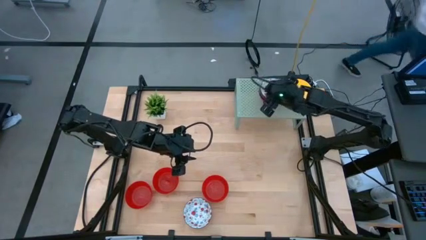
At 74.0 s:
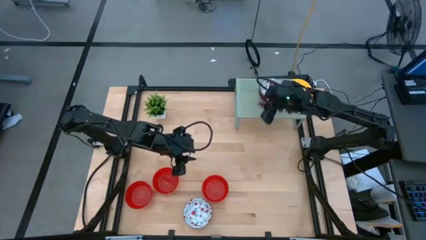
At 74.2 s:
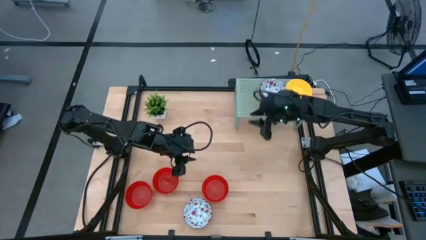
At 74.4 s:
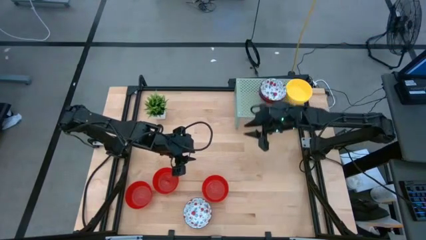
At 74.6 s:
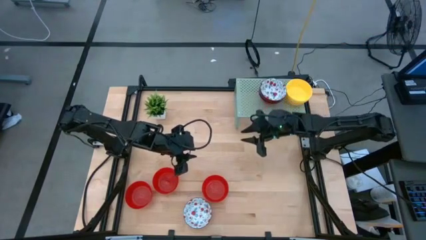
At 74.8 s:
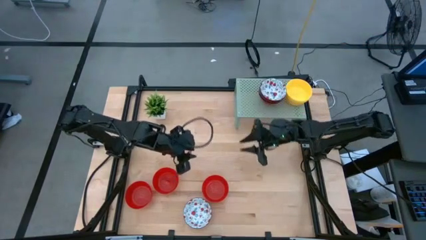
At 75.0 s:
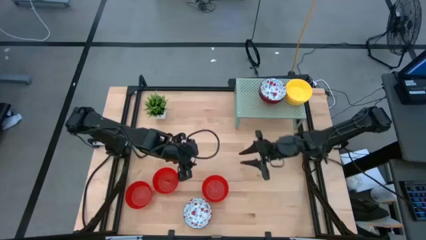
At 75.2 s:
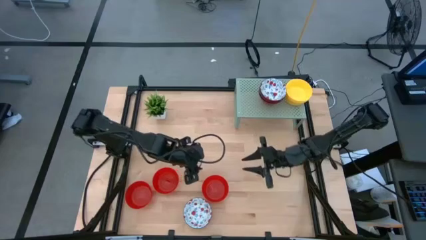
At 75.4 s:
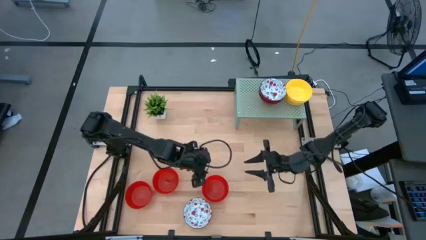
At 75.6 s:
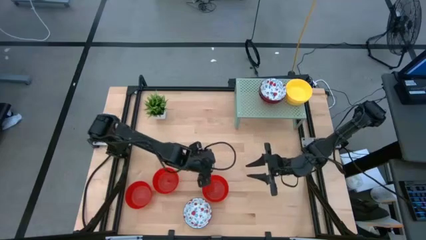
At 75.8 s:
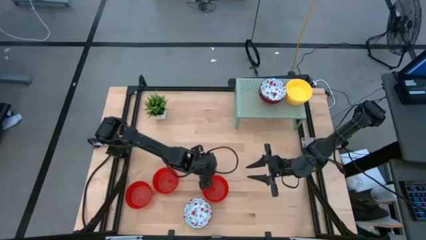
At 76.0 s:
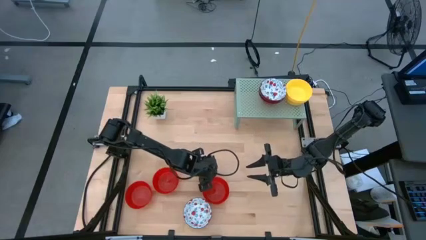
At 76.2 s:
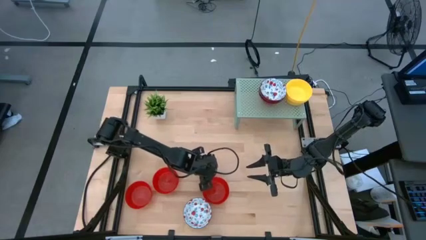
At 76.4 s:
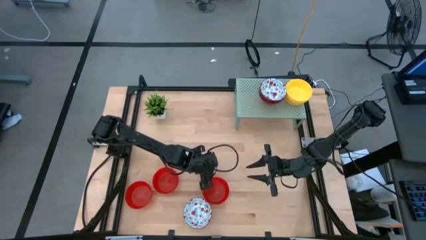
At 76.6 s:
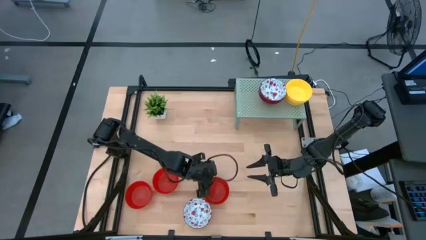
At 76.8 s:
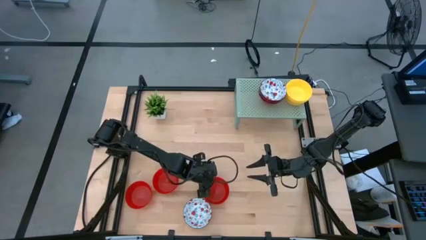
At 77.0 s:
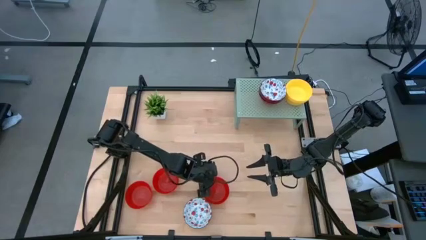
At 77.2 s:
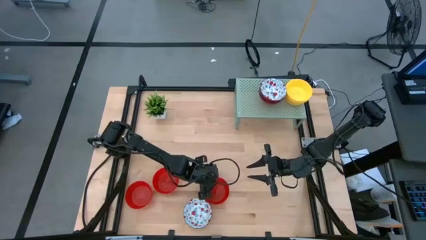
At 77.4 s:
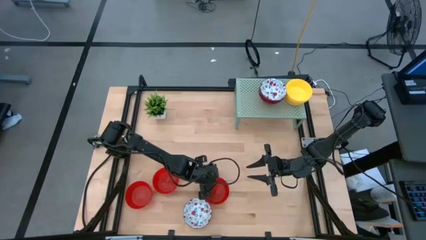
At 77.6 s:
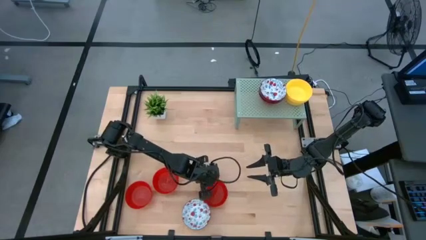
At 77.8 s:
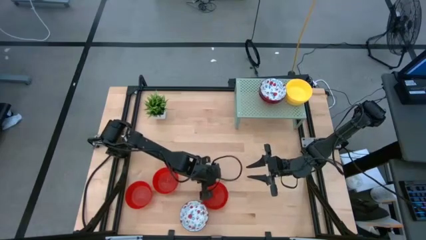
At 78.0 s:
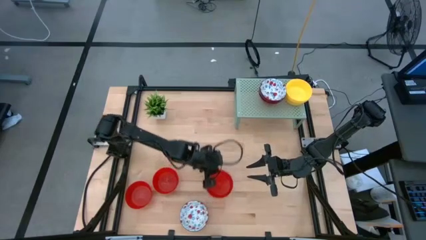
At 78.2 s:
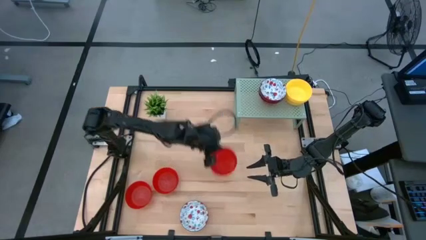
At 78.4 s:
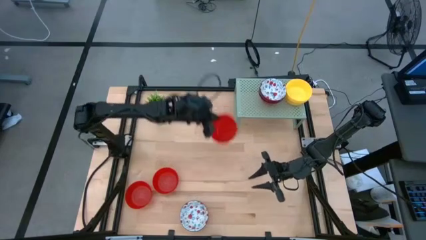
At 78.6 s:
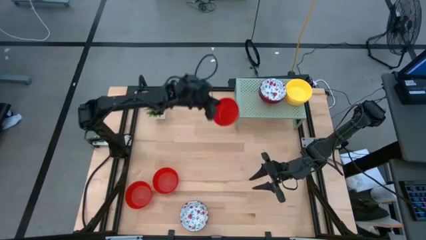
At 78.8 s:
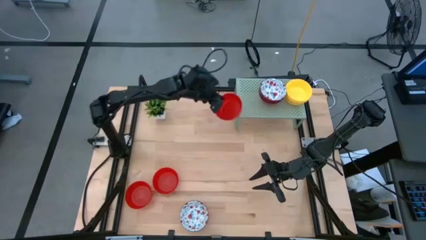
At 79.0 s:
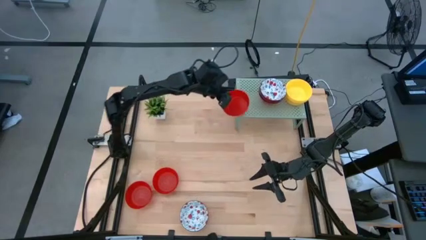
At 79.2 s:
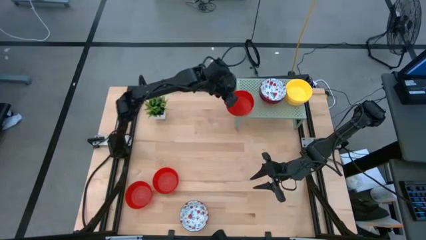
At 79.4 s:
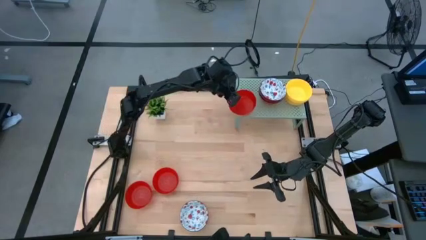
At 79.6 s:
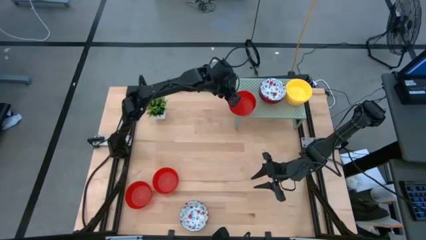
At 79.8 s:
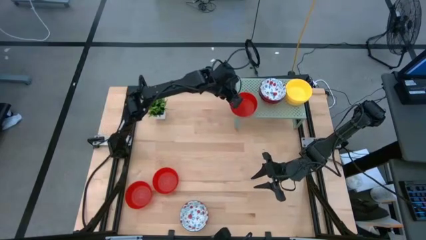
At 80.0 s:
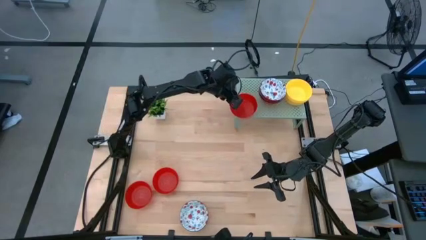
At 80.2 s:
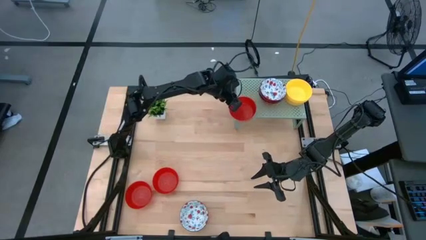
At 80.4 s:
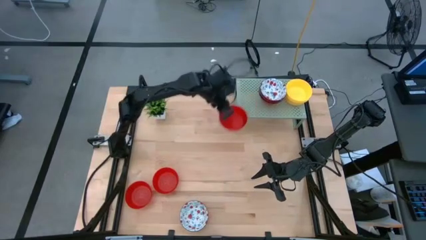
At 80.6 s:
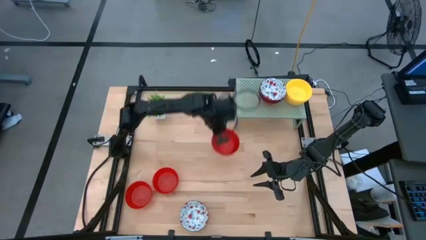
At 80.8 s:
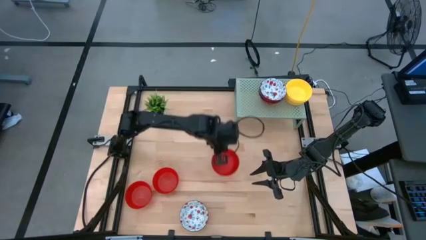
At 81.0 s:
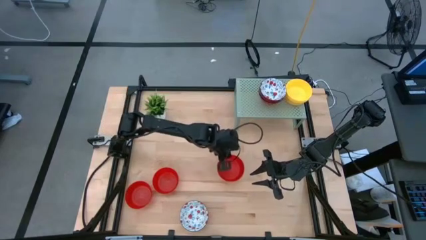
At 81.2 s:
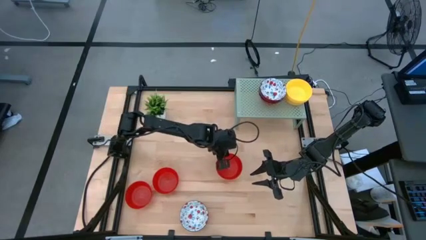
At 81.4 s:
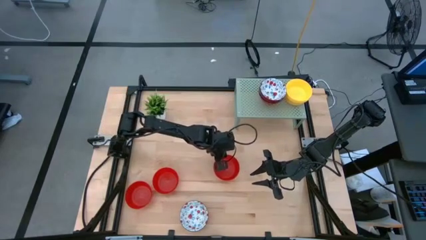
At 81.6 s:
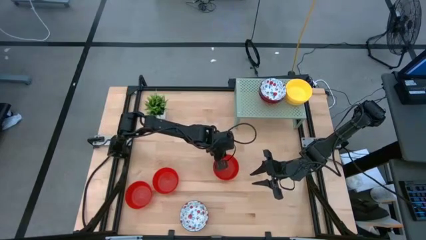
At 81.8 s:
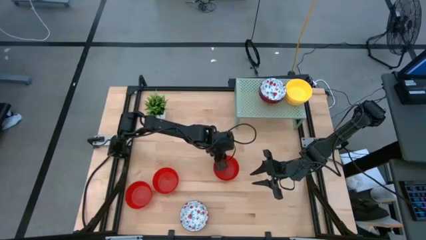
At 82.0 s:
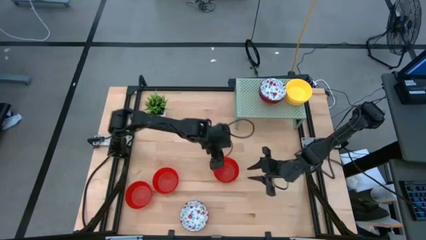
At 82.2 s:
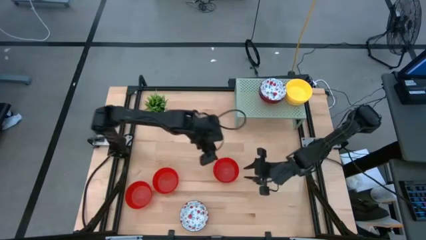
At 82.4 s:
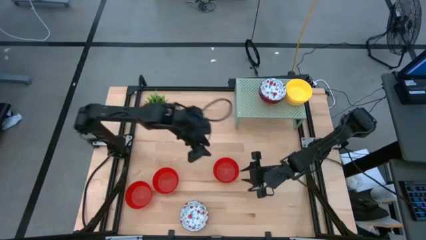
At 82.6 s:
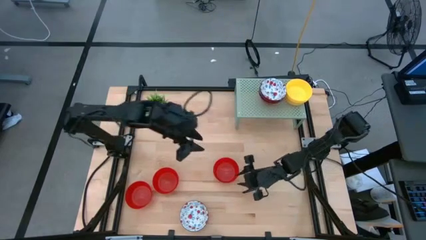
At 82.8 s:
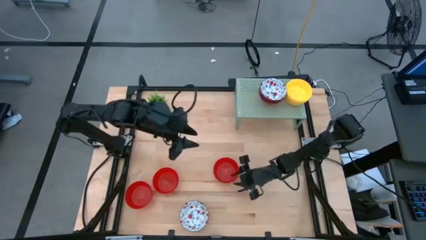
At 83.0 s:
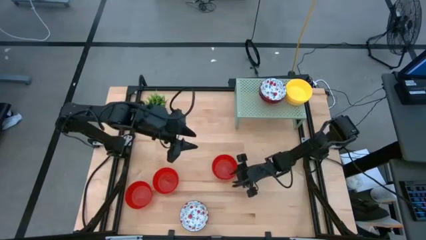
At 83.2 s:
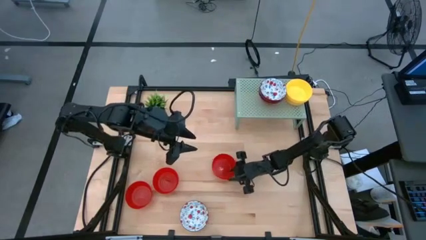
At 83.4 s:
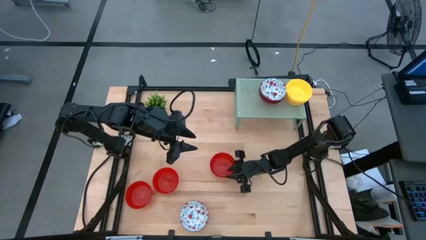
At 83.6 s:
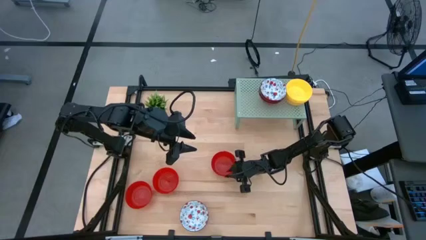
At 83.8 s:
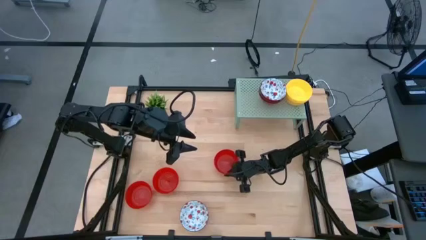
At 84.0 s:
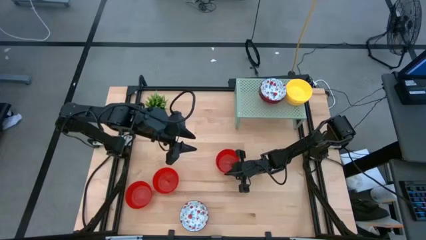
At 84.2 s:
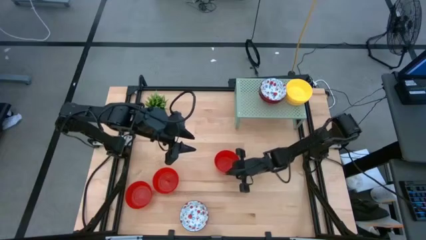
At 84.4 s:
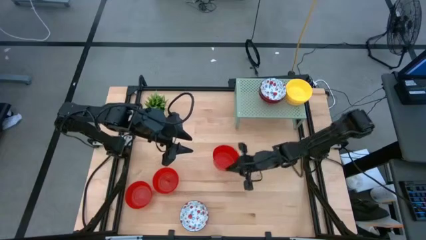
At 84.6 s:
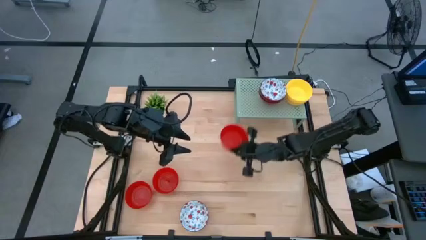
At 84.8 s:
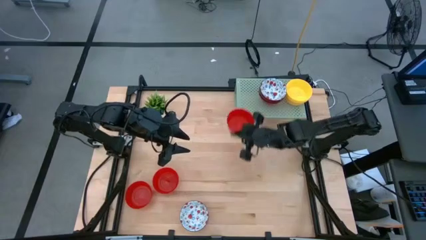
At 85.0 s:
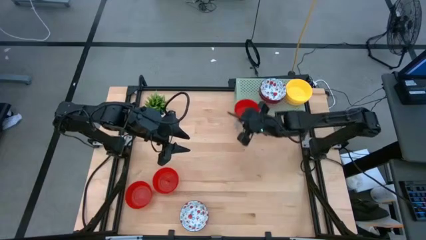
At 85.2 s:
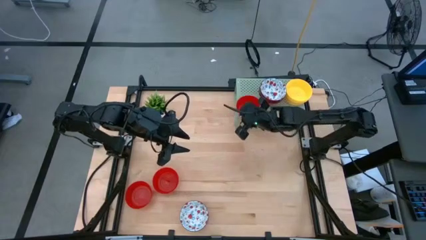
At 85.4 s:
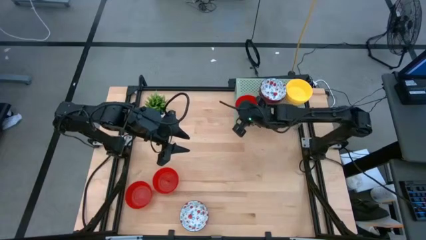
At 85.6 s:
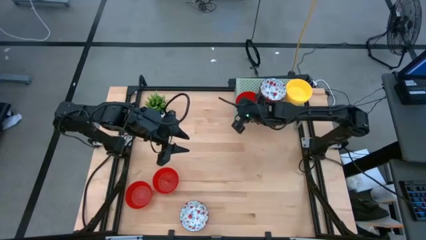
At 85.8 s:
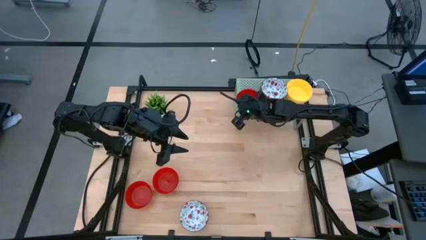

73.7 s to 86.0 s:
Task: Pick & Place Mini bowls
Put the red bowl on the shelf

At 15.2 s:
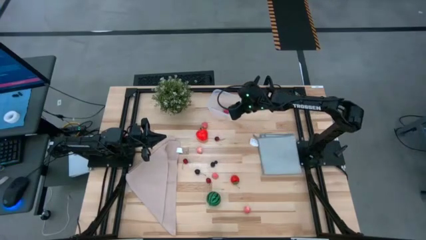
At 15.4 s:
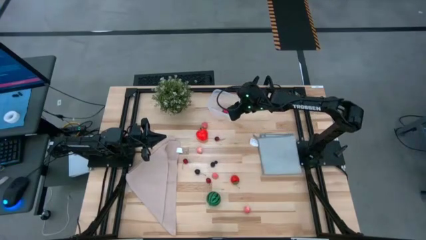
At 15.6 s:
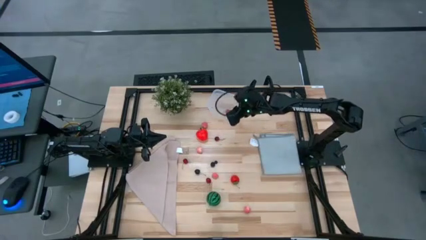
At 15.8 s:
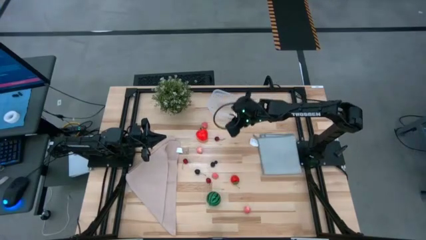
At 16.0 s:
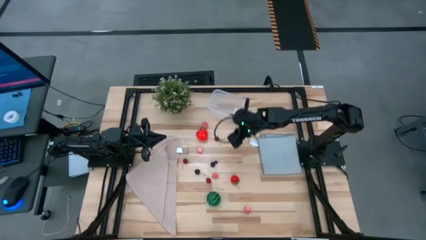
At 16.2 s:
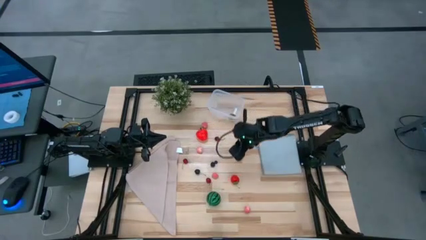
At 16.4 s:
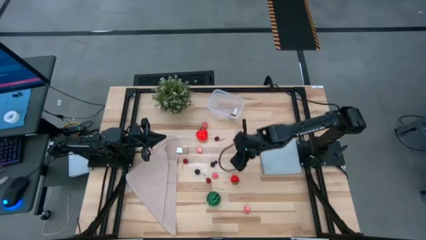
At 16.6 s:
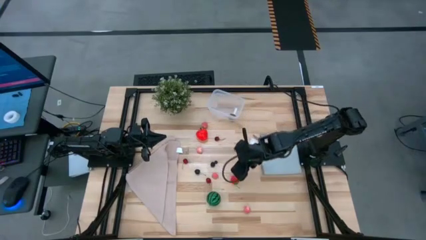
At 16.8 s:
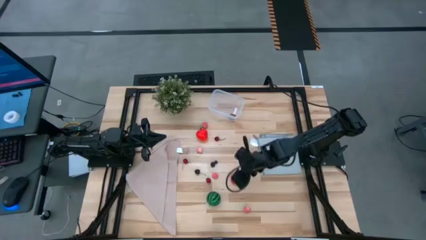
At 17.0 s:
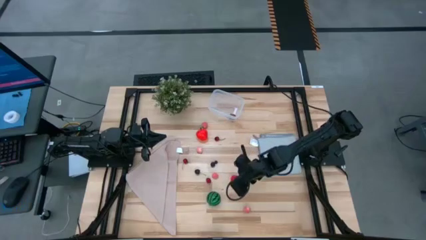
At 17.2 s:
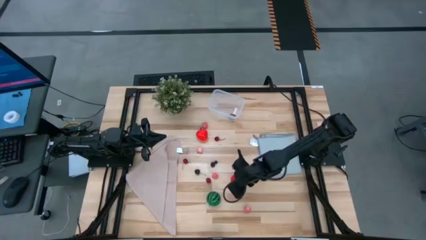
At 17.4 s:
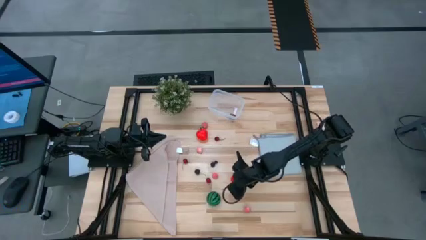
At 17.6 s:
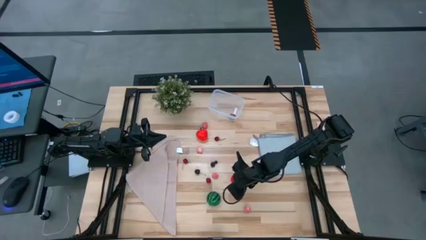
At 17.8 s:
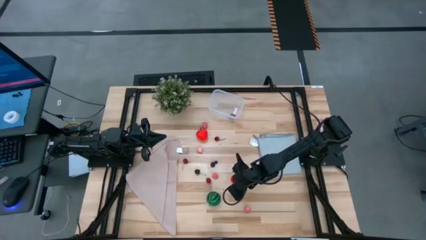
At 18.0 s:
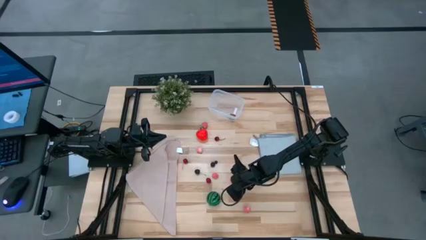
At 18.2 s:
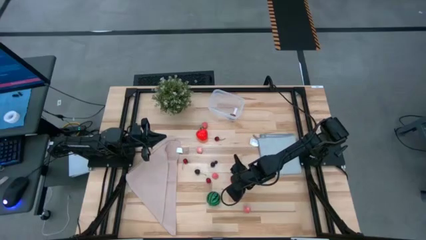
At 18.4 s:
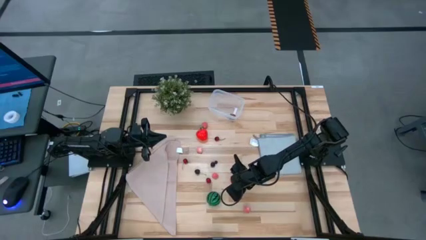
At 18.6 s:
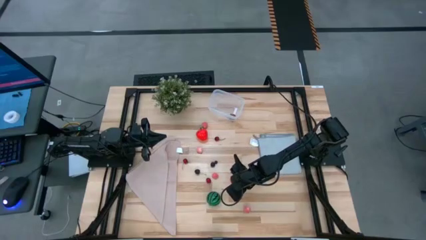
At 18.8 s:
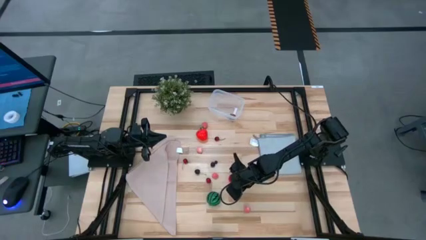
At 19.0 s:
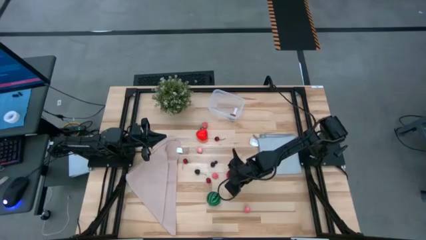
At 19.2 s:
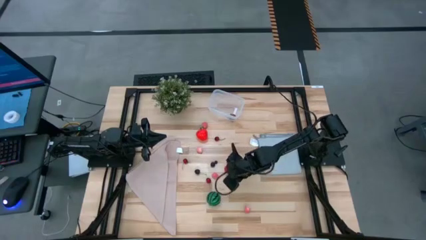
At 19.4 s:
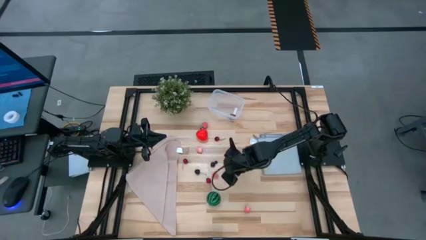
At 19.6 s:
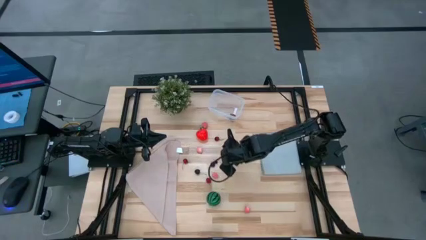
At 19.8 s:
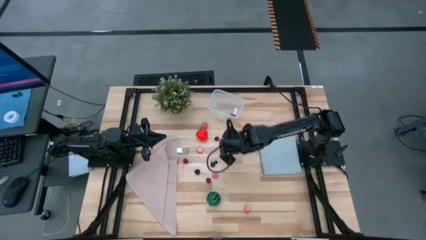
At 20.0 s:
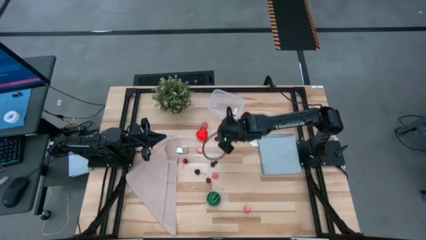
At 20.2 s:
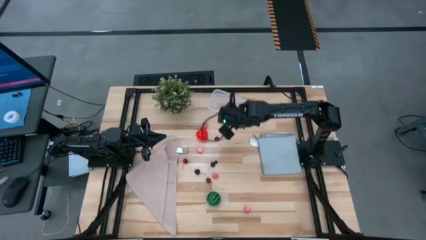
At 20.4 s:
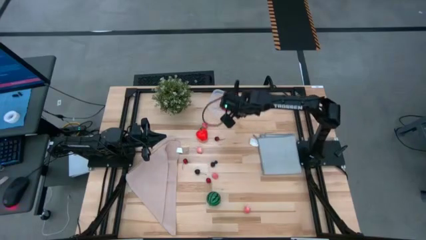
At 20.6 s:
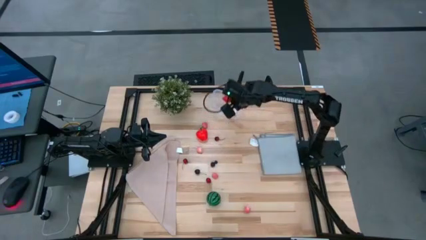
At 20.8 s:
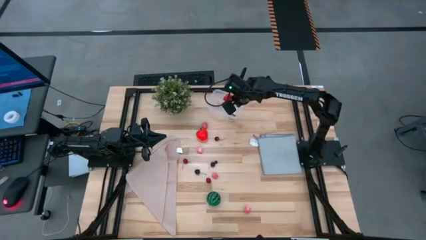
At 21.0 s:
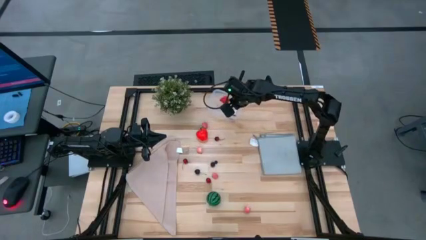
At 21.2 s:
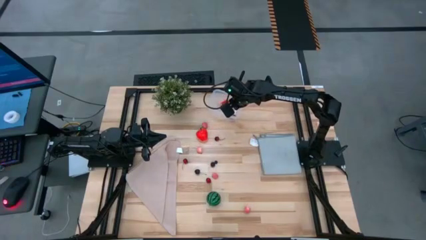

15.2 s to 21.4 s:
Task: Pick and placing Produce into tupperware
Put the strawberry into the transparent bin
